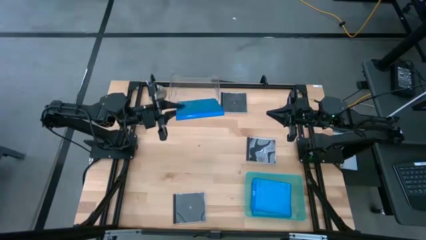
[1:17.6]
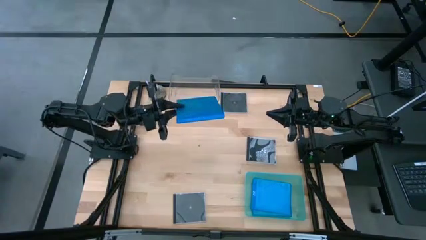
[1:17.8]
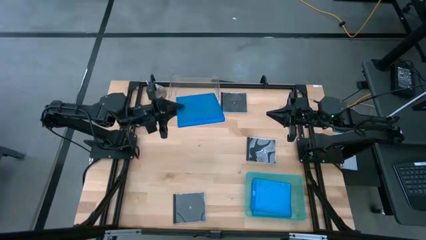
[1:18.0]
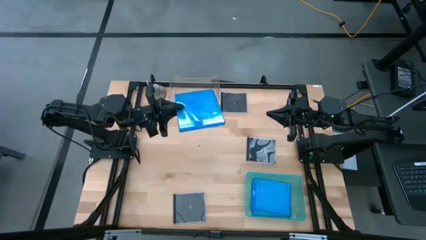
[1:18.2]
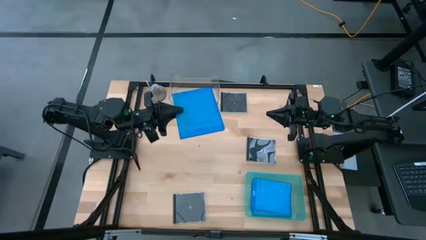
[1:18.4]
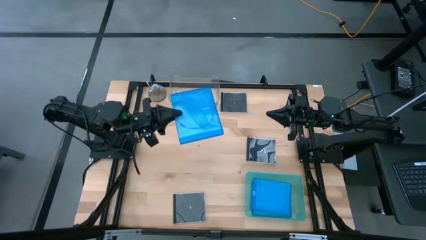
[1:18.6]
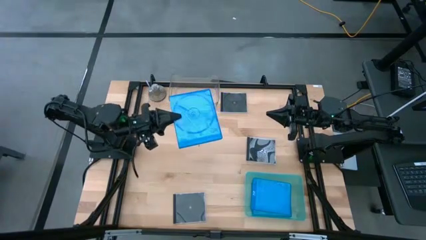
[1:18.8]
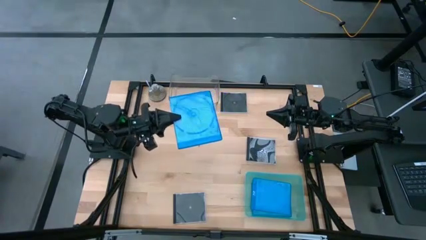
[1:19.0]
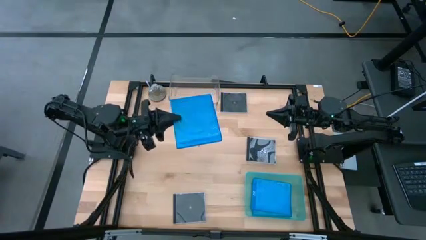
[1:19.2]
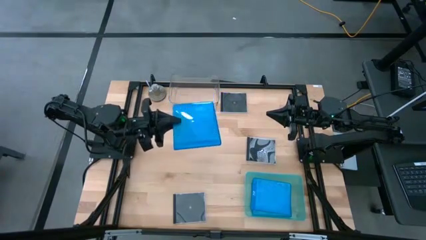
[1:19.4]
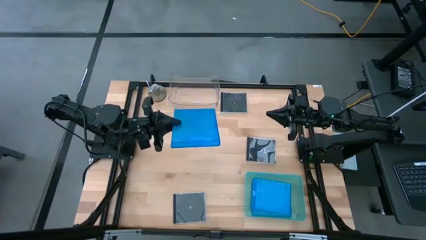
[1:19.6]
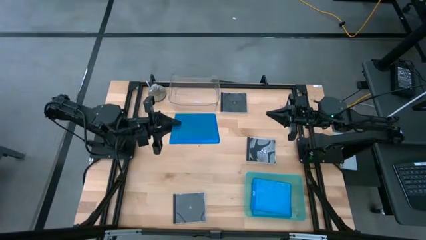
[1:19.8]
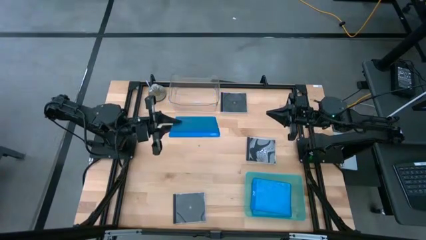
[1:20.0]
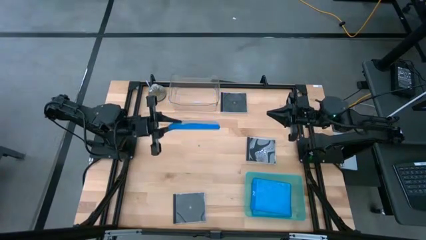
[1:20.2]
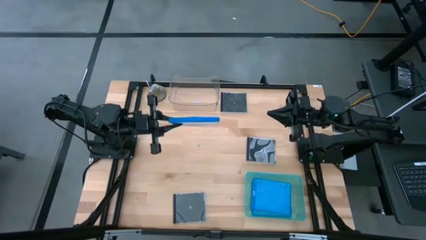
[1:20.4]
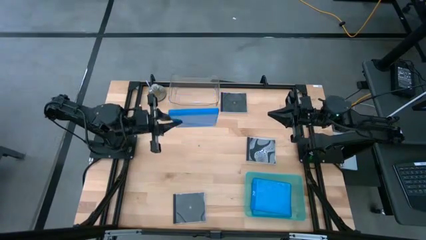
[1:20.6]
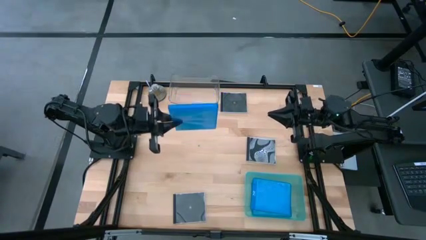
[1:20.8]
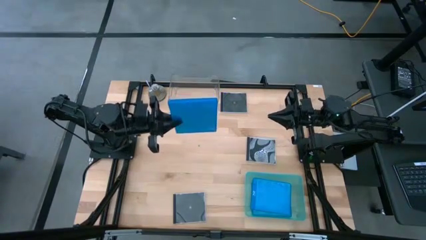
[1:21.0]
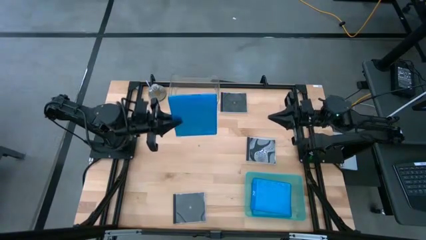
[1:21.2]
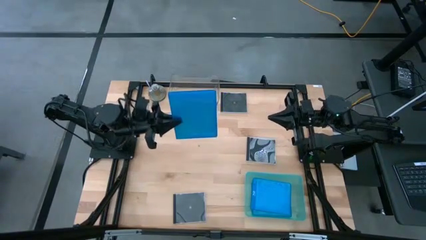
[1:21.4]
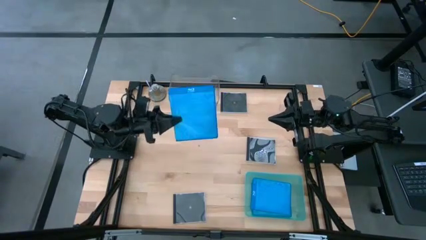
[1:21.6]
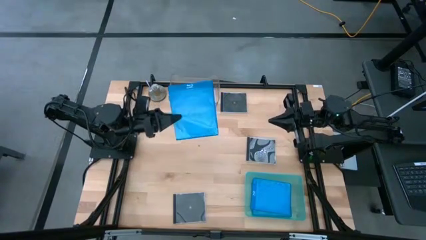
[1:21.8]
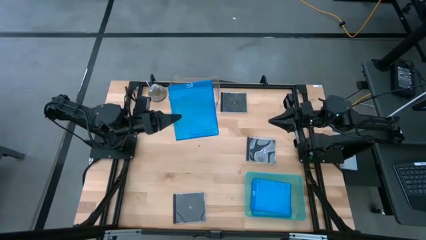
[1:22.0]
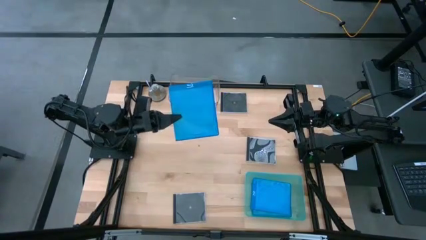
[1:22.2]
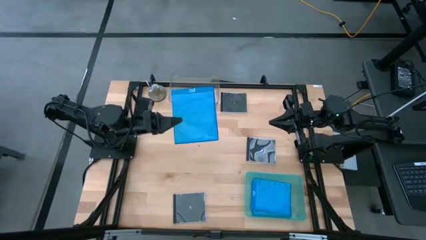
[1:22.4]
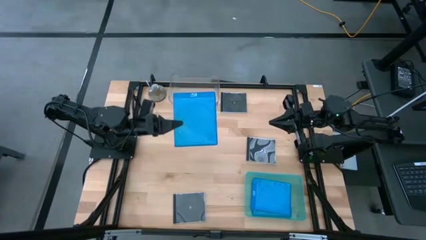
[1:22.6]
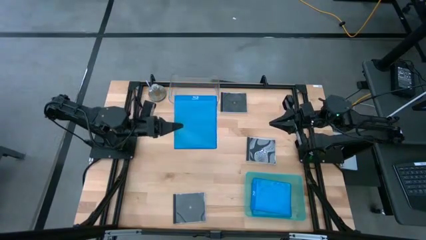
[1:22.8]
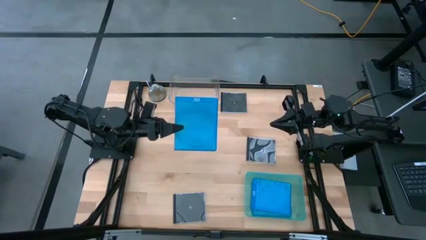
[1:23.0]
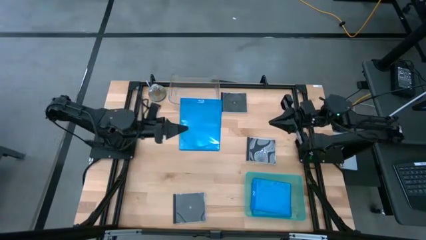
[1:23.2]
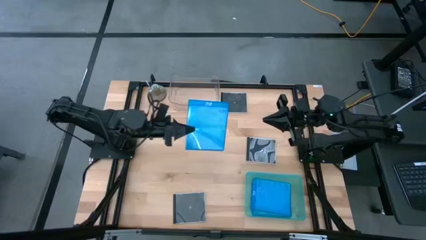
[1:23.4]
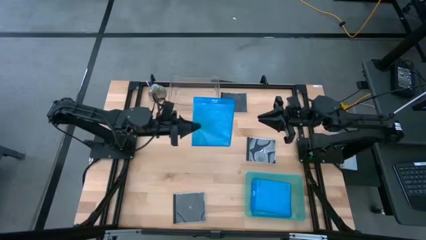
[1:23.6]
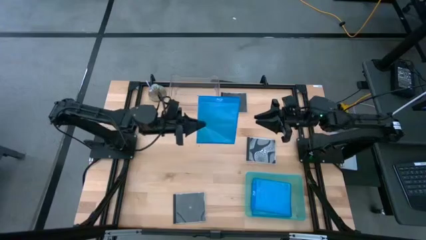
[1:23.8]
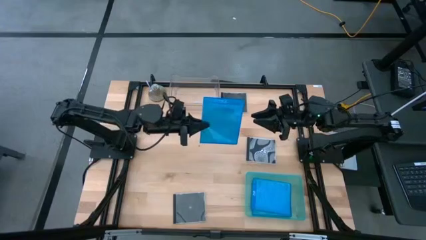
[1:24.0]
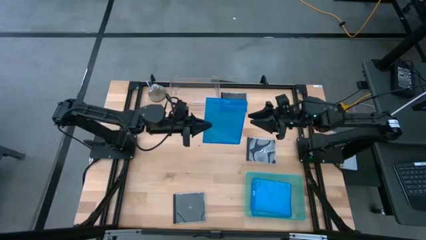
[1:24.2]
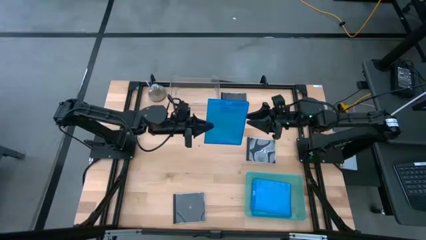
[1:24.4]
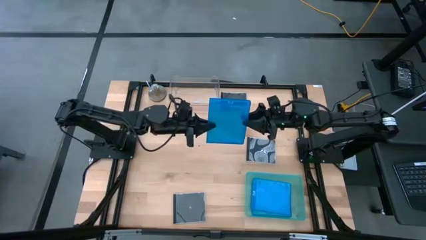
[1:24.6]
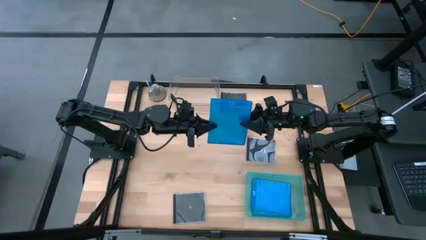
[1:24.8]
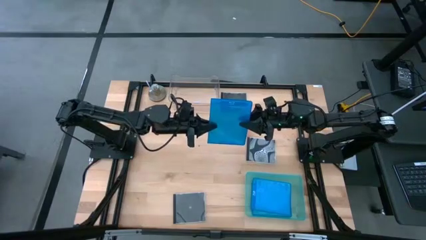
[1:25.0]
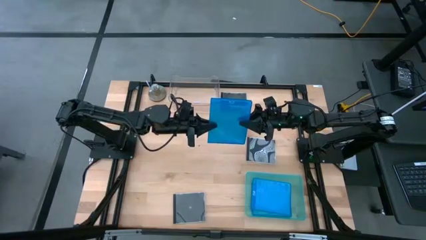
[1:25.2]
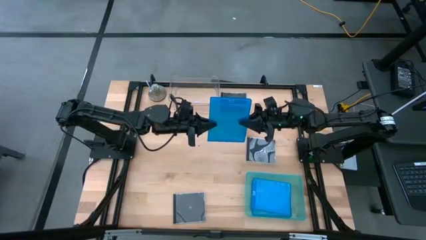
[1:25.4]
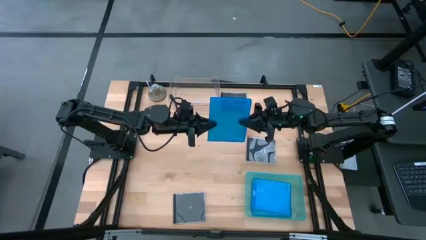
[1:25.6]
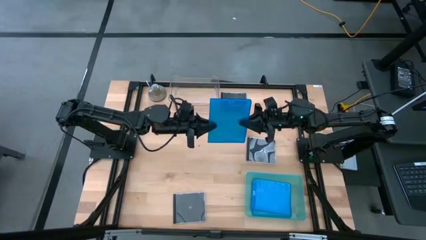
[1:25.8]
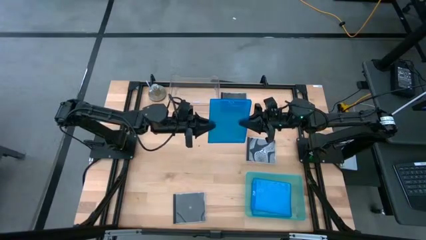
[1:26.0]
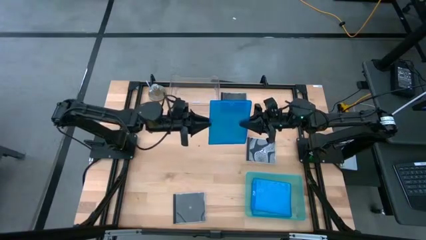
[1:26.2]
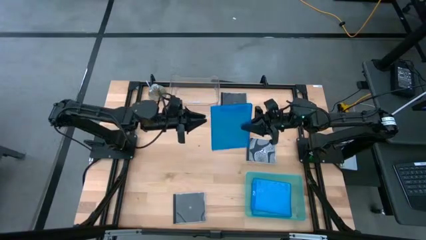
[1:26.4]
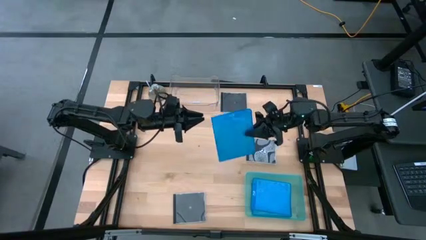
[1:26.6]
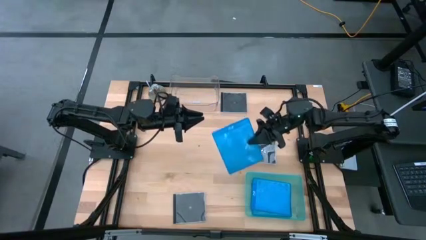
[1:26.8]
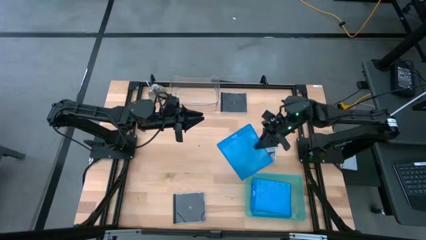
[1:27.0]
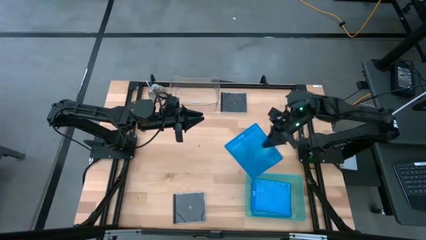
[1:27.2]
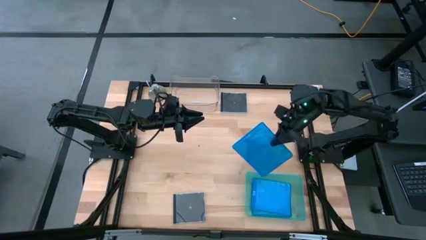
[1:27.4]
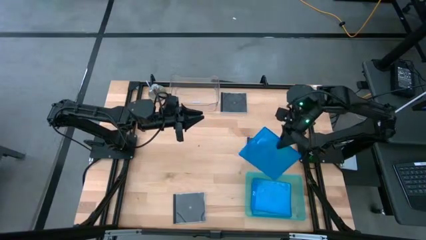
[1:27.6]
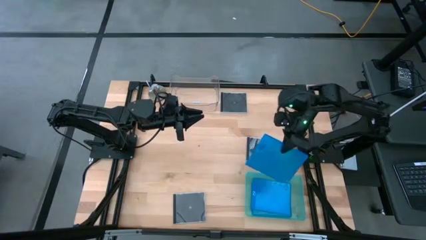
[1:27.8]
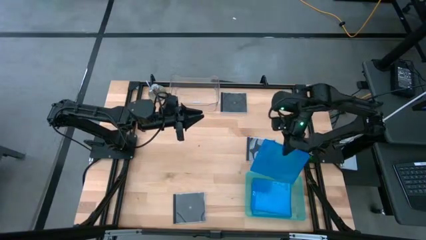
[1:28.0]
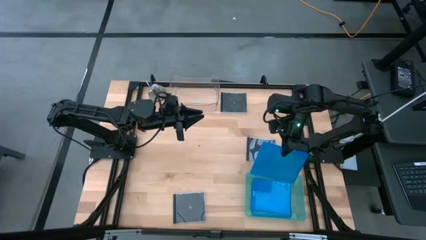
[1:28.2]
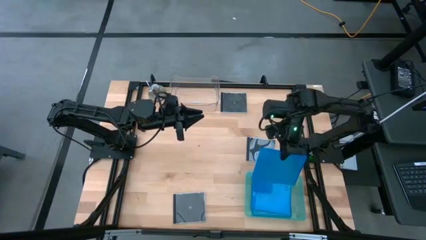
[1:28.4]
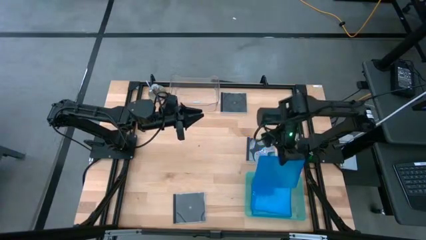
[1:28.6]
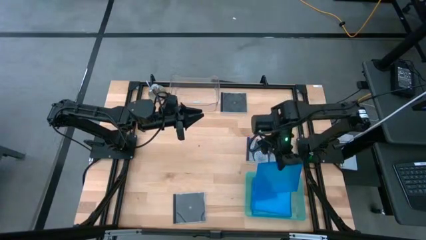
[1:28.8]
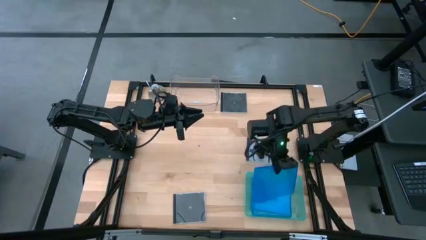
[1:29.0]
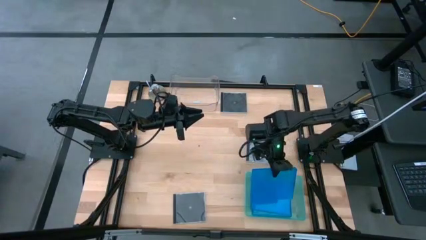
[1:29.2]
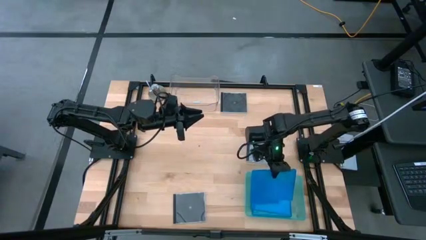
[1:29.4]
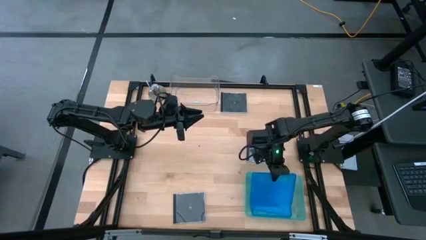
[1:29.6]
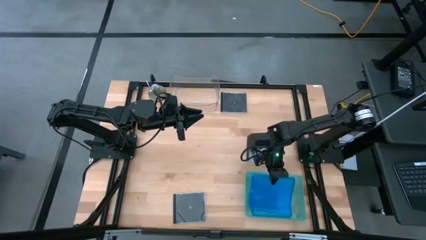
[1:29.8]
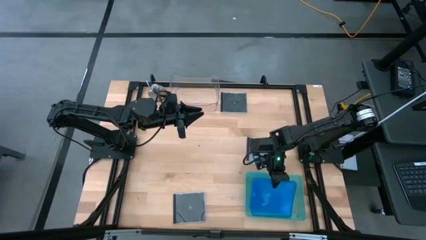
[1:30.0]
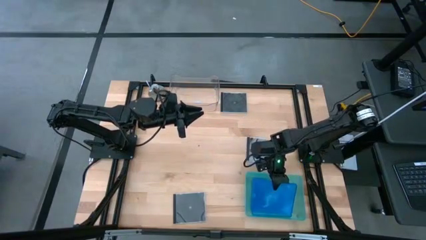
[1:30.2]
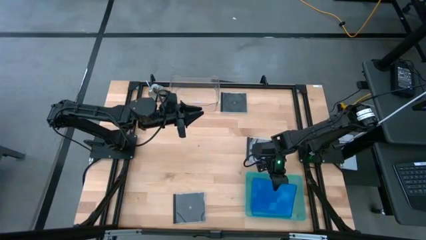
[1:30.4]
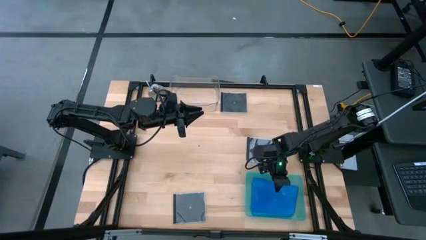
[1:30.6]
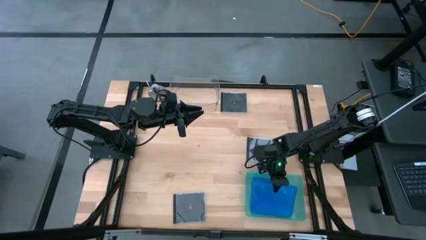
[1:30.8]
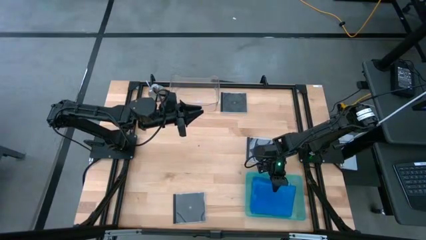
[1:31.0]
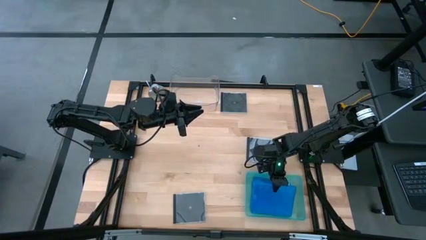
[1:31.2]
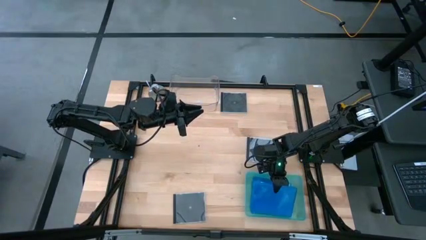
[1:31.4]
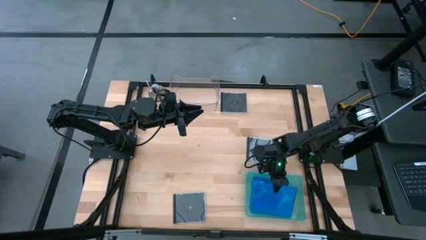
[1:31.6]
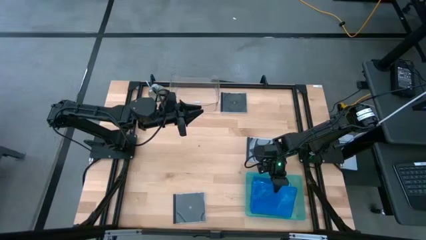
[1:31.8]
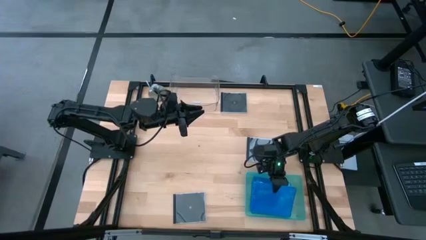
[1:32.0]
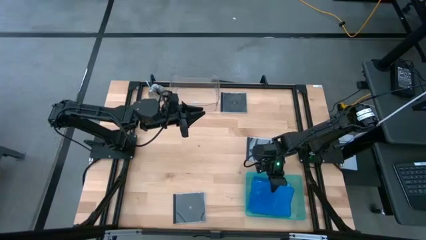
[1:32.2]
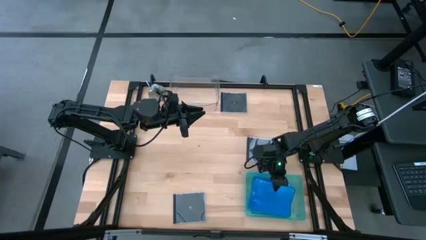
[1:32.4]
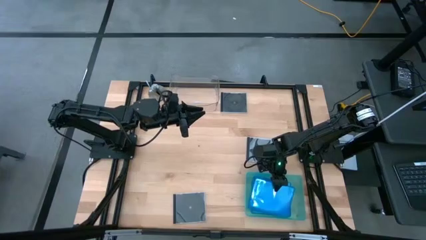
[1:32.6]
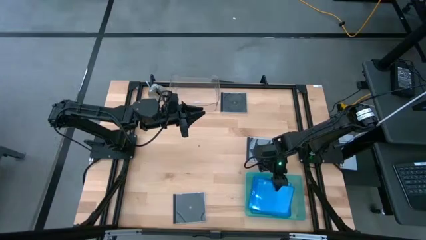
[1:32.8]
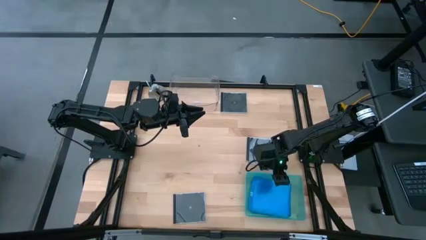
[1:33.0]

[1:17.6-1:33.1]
Task: Pick & place jewel cases by type
Put the blue cd case into the green bin

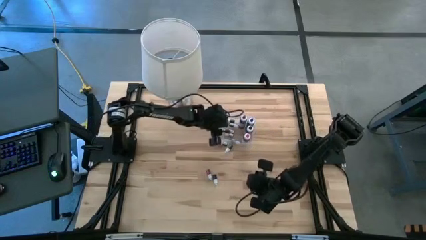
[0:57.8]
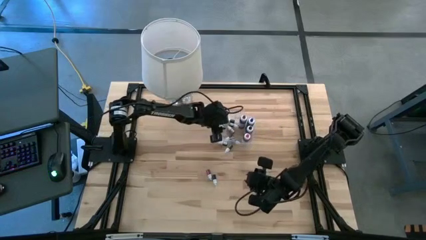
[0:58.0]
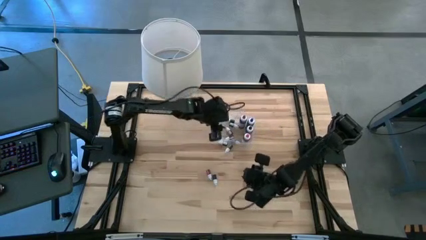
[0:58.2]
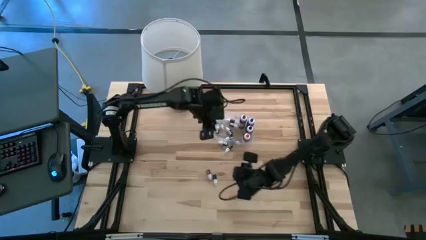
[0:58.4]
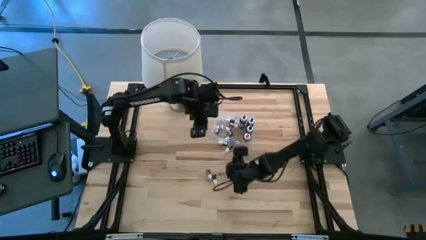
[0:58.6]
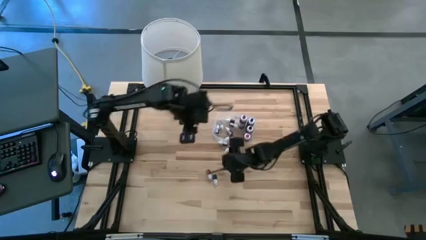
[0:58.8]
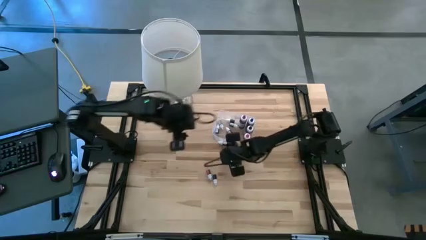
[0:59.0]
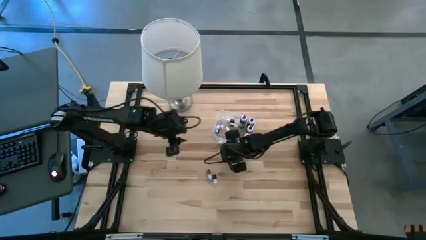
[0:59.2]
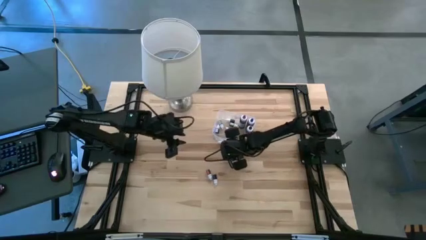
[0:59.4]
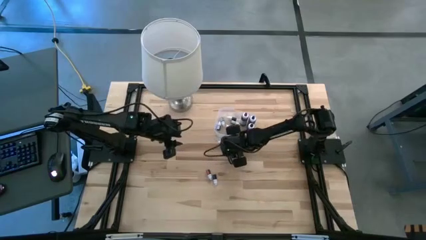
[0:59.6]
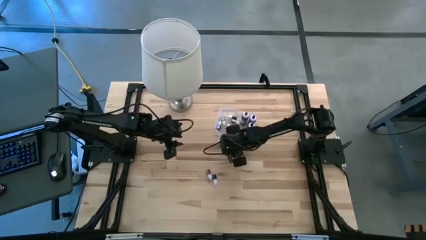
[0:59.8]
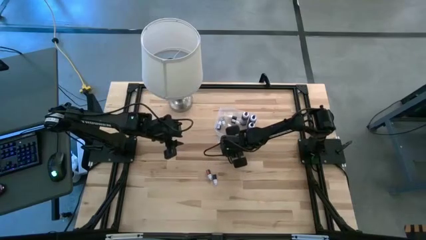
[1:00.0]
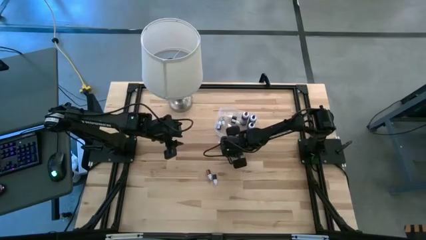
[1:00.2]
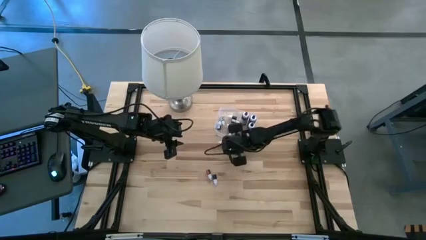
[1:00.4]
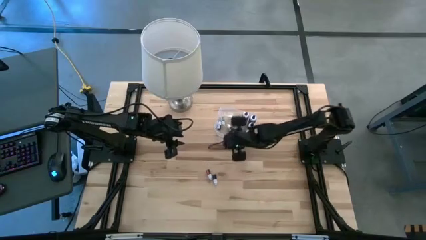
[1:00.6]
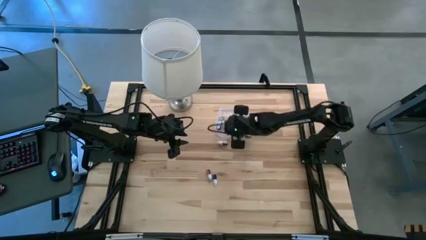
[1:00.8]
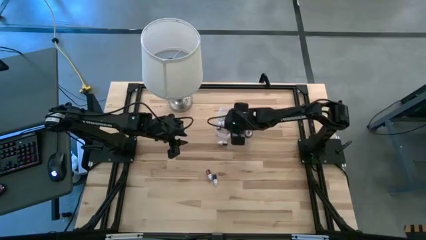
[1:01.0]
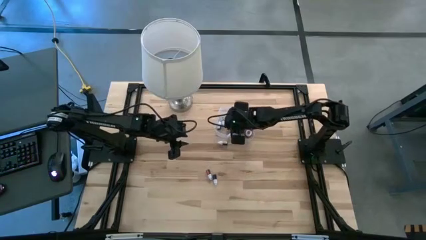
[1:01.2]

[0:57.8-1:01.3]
Task: Pick & Place food coloring
Put the small green food coloring bottle into the transparent bin
